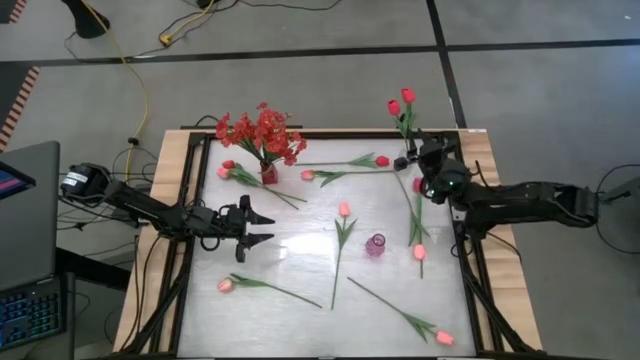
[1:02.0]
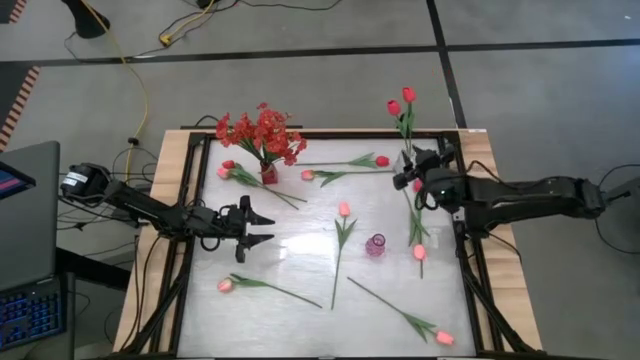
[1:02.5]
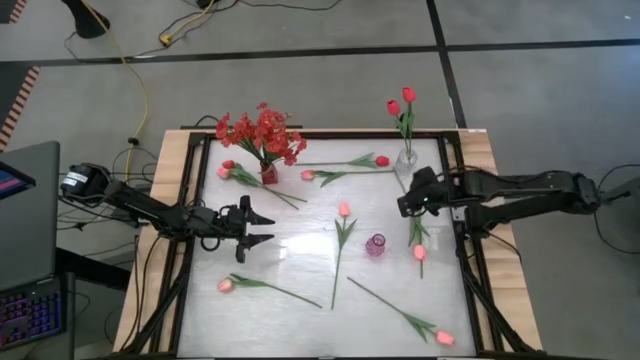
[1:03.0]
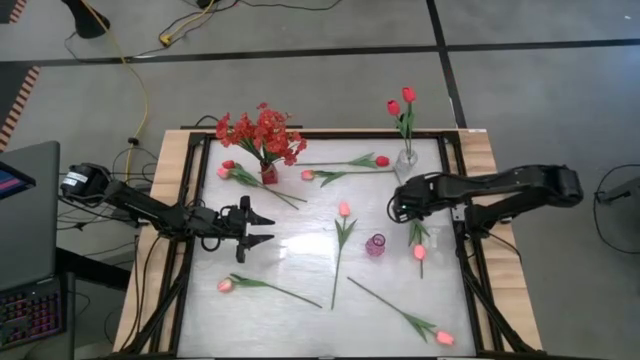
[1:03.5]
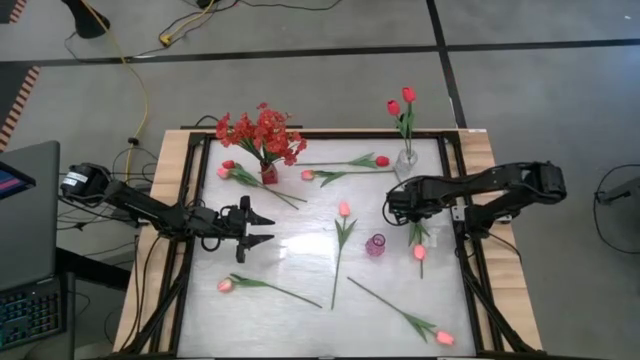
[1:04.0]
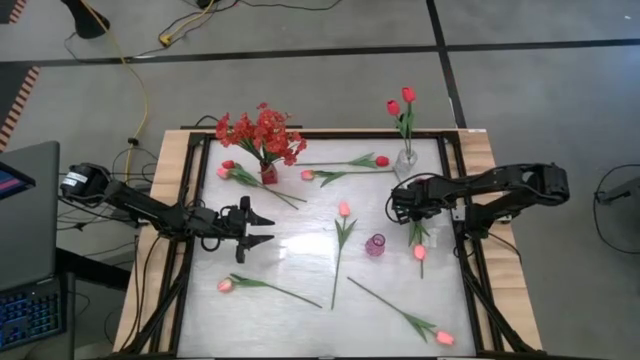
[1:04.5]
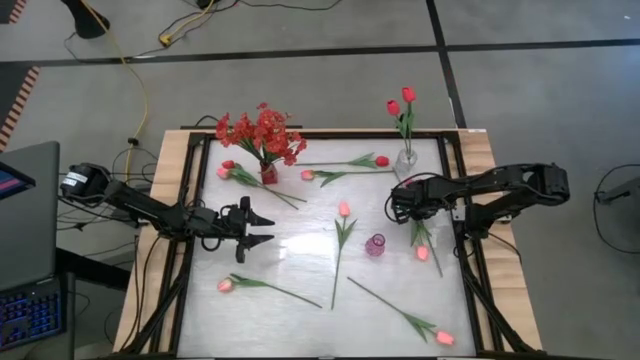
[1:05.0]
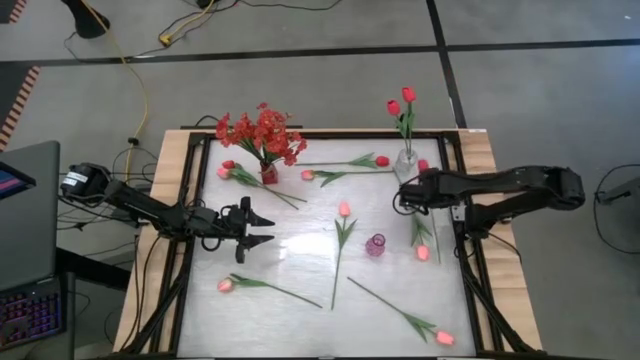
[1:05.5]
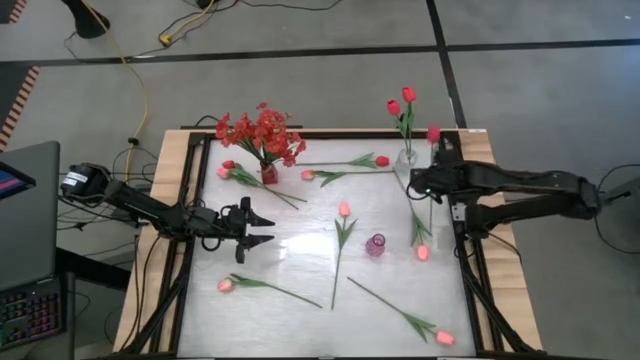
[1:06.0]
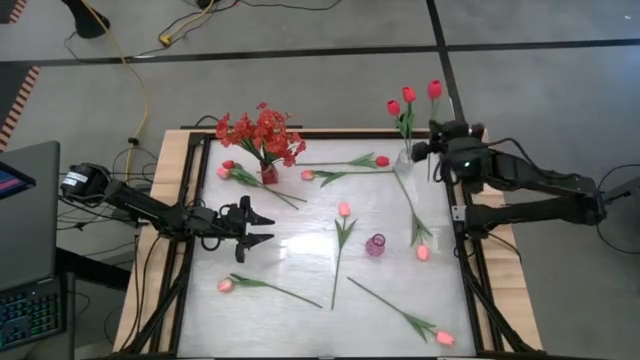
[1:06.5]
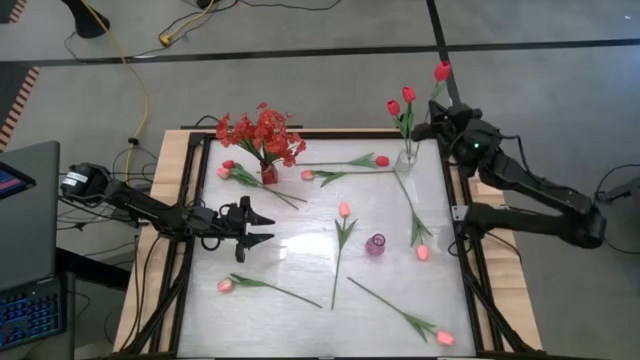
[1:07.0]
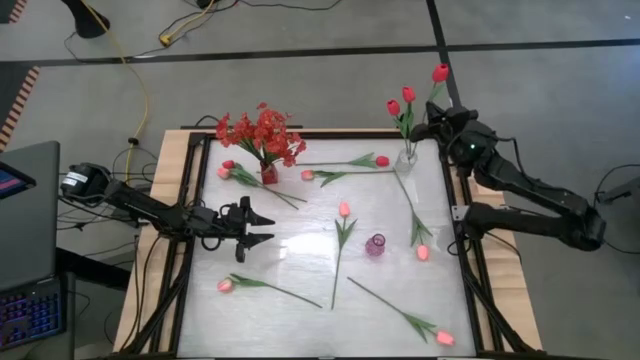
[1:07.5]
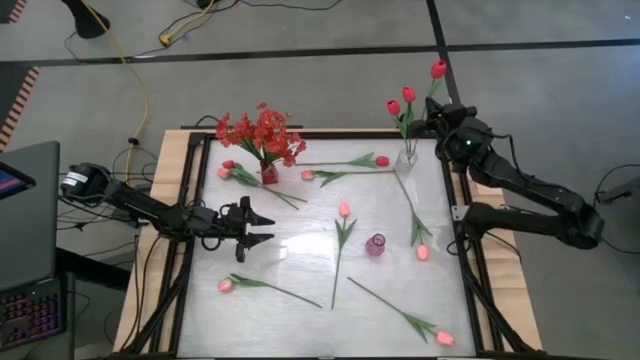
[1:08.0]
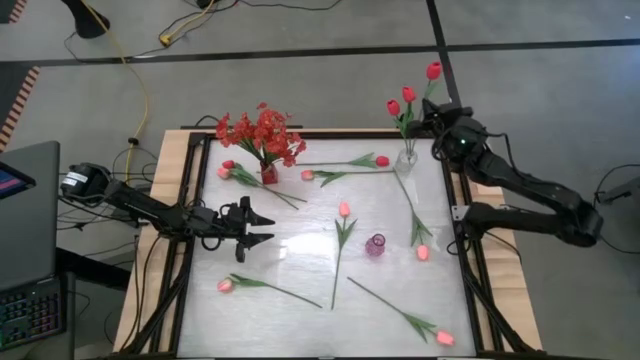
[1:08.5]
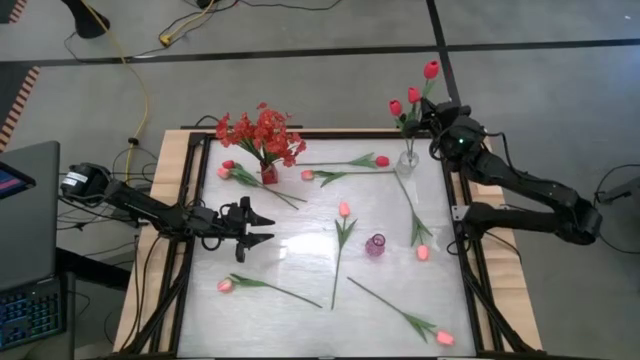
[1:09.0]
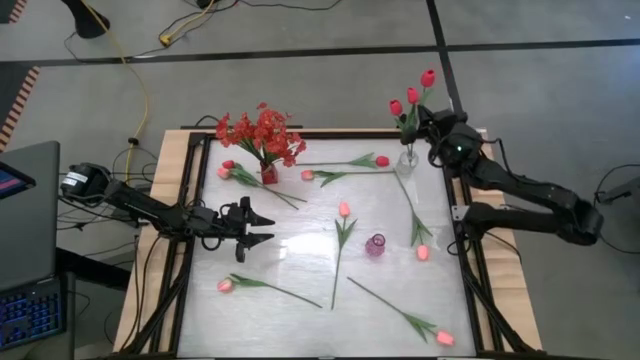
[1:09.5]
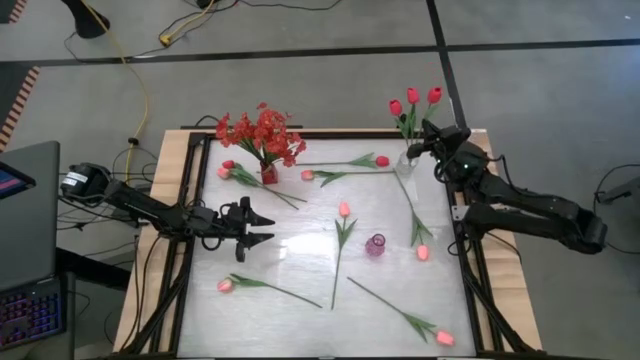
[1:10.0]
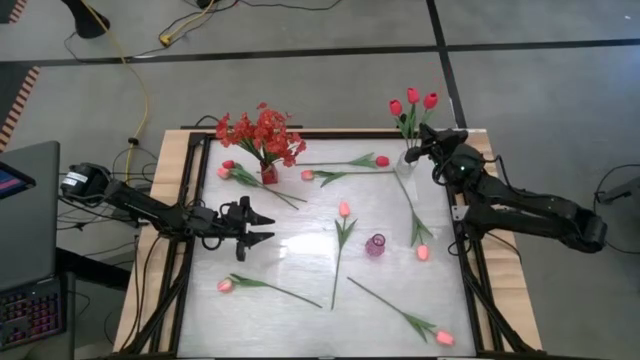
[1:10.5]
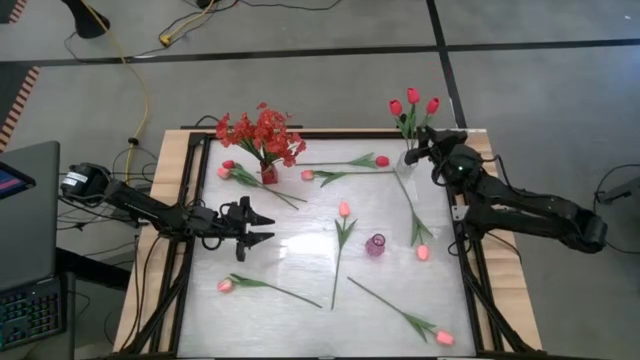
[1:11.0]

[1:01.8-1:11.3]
Task: Sort flowers into vase by color
Put the red tulip into the transparent flower vase

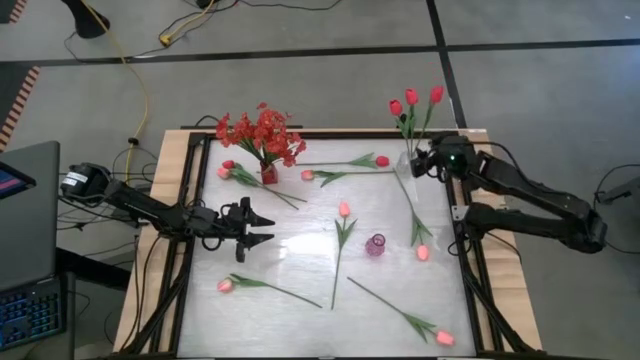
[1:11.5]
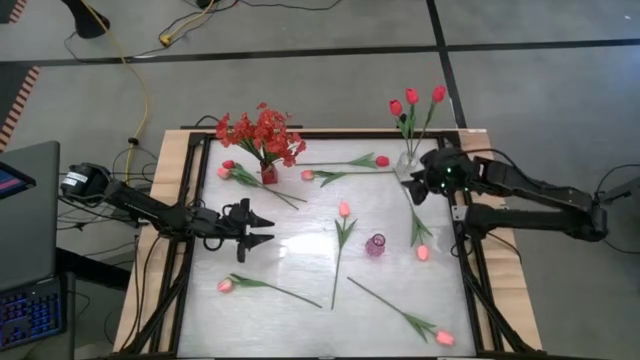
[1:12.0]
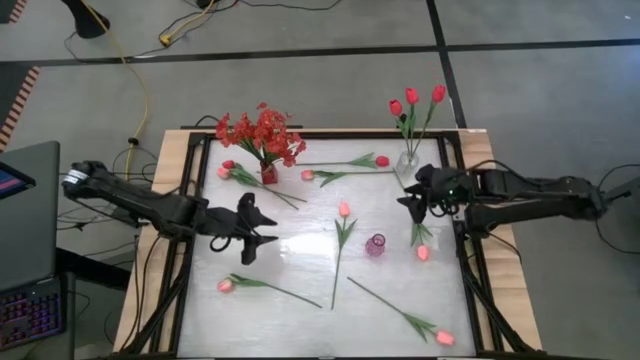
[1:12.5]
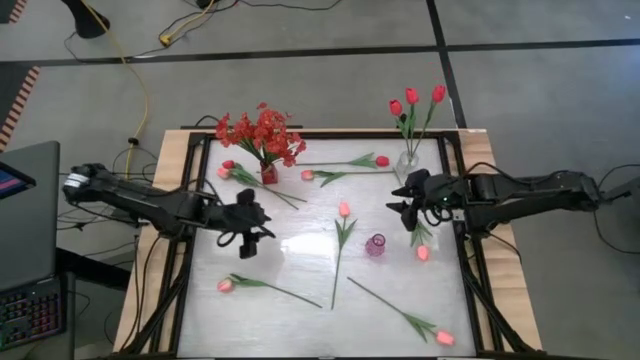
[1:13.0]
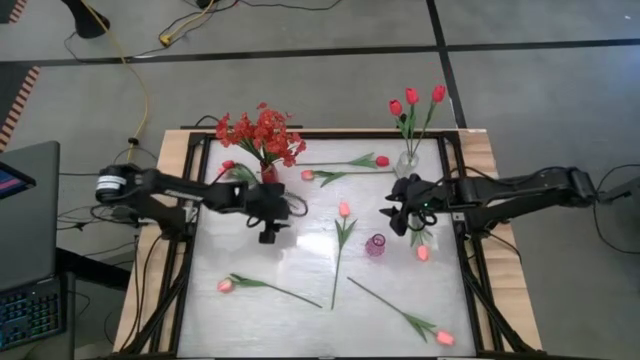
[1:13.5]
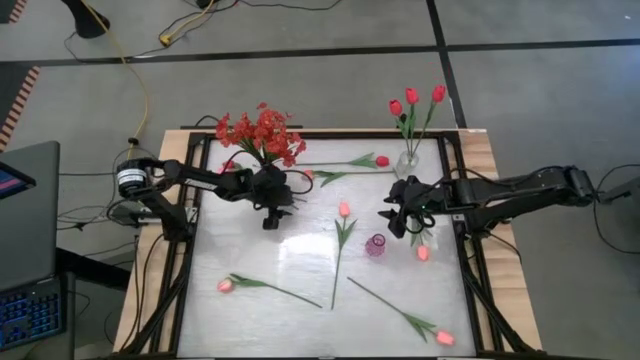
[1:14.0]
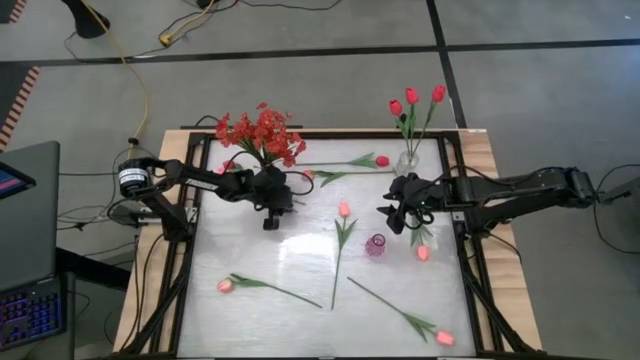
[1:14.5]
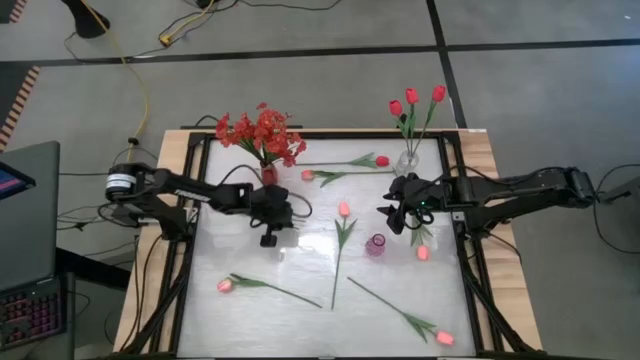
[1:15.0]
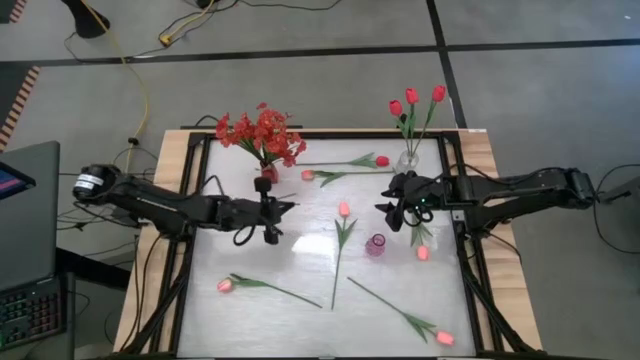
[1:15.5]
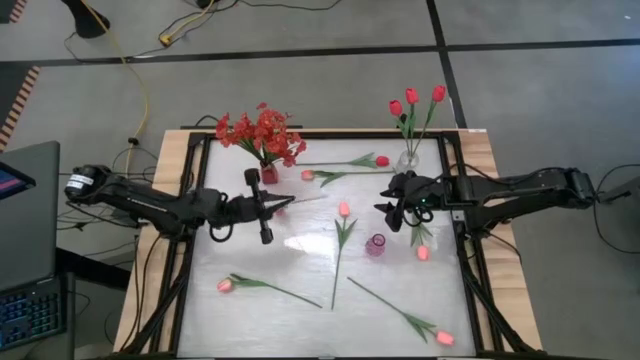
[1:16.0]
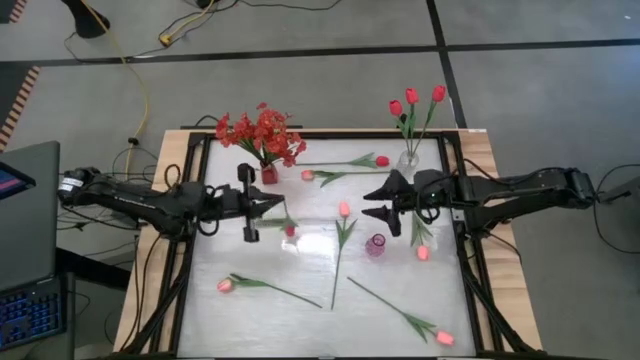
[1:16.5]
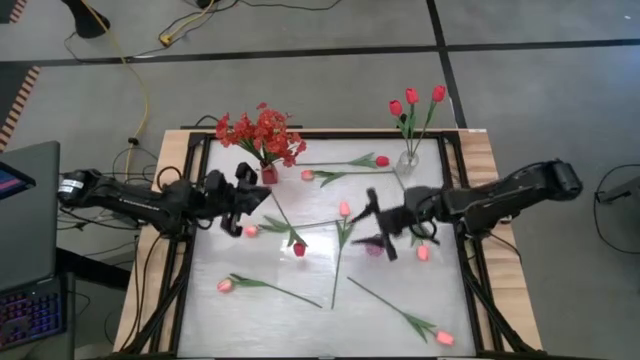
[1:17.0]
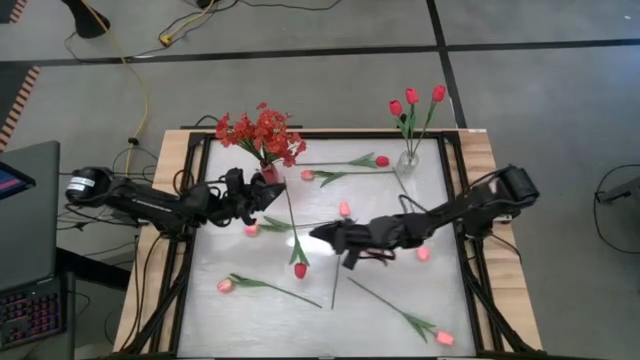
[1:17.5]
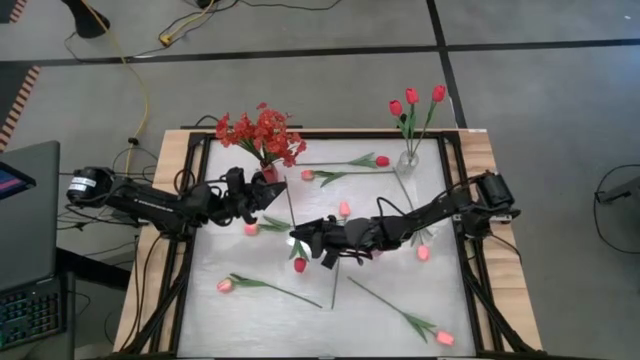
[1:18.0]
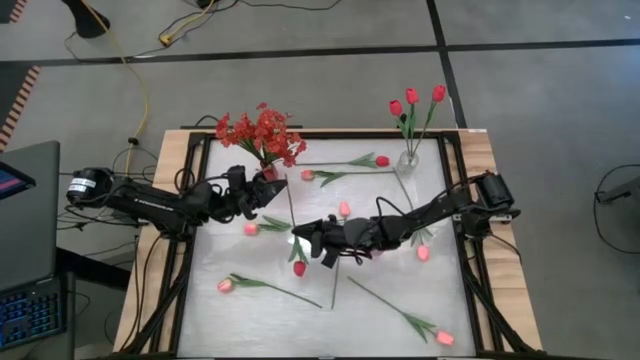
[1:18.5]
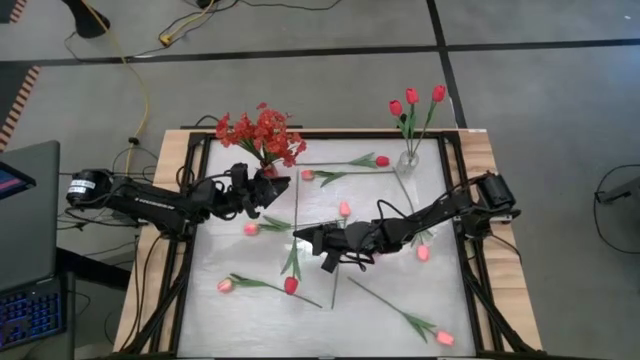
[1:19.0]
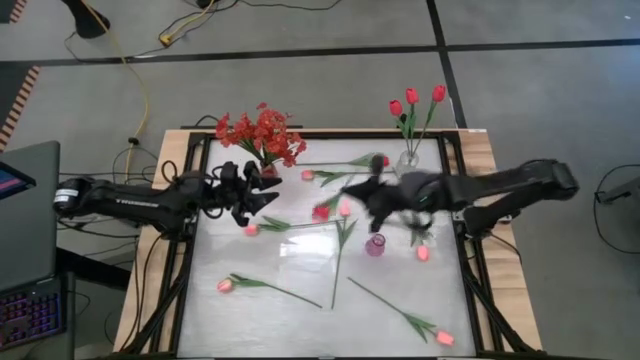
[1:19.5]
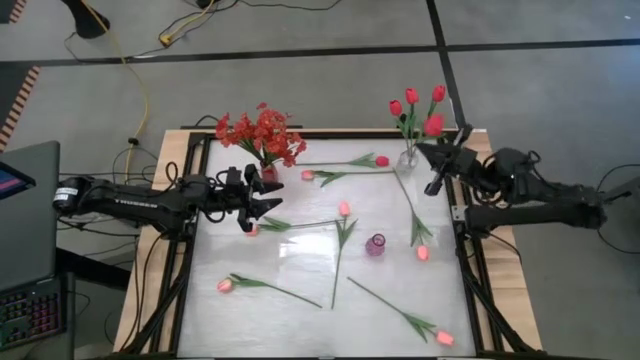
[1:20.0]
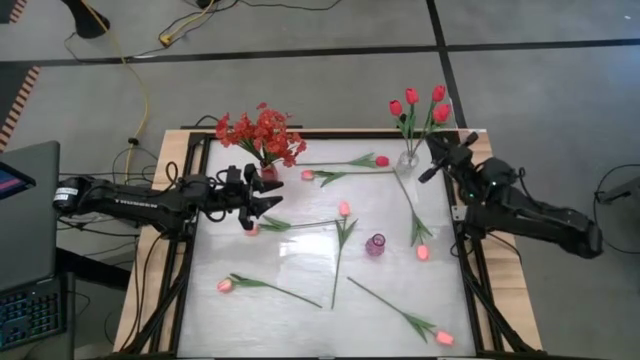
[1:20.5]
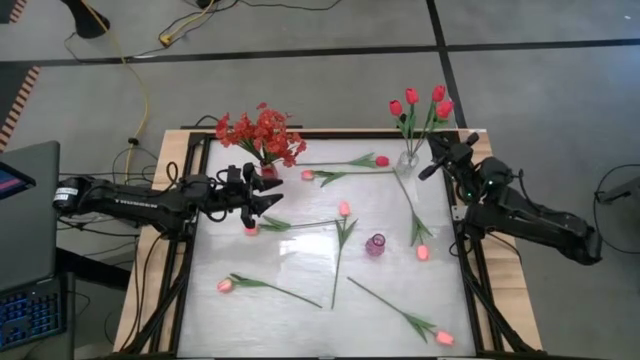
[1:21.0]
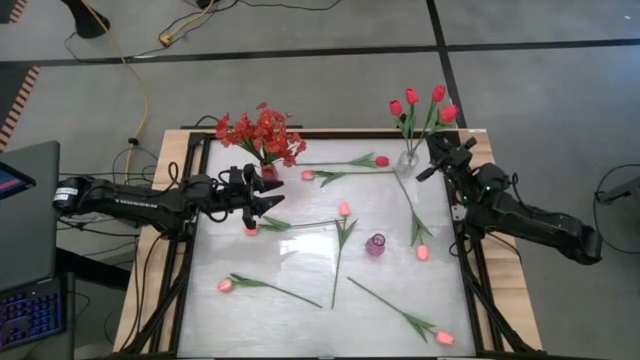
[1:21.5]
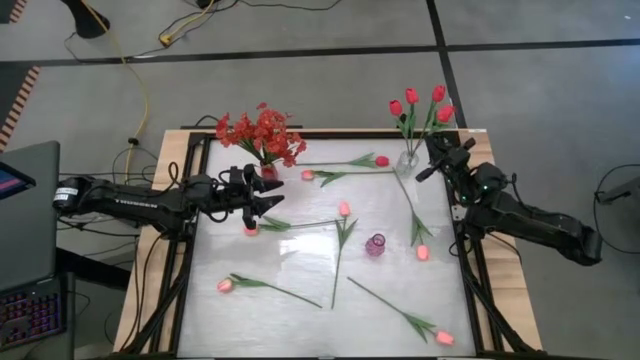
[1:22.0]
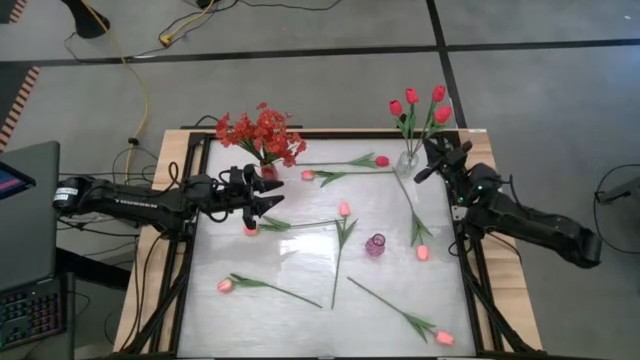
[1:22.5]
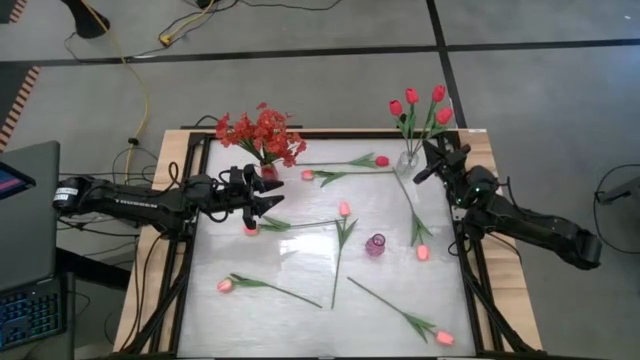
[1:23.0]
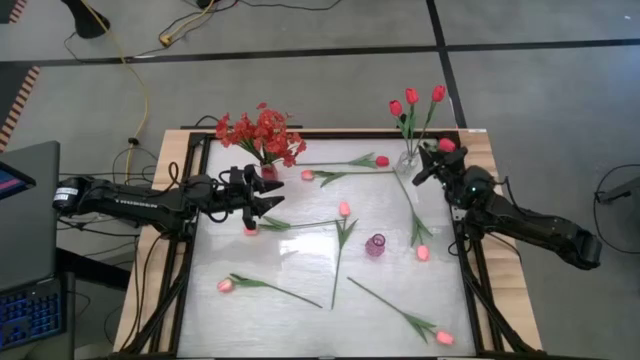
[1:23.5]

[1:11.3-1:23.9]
Put the red tulip into the transparent flower vase
